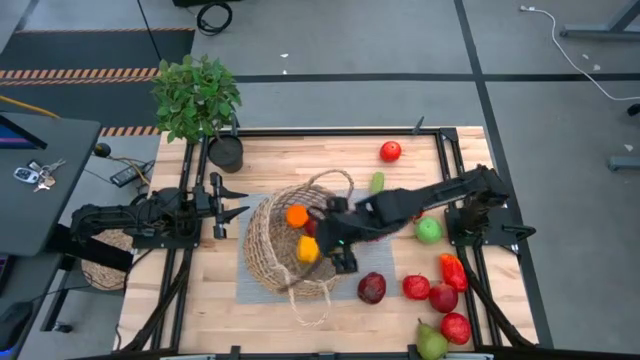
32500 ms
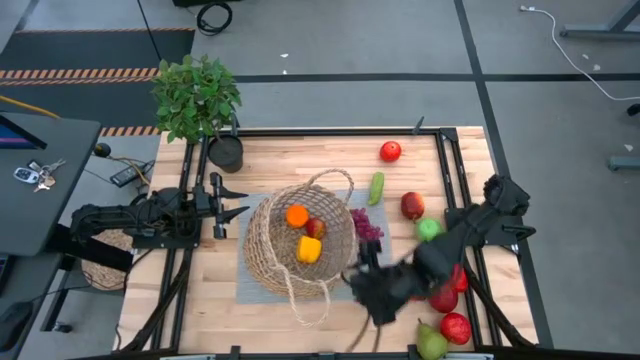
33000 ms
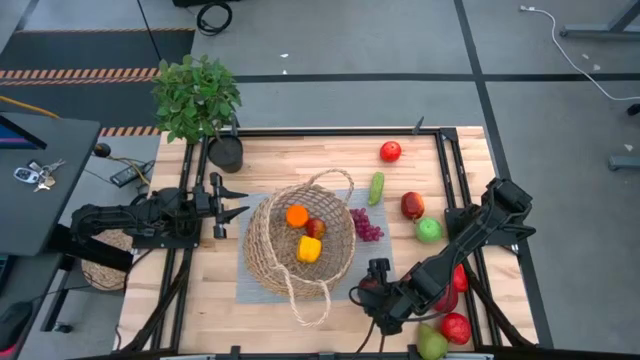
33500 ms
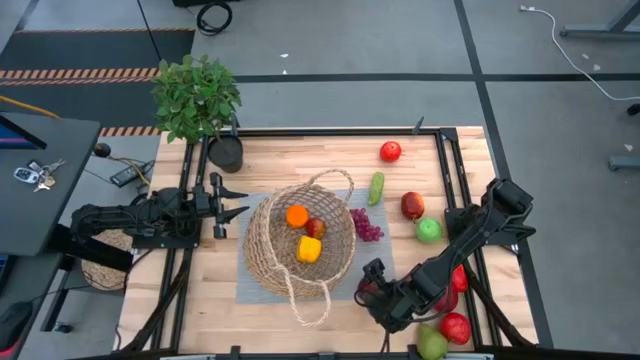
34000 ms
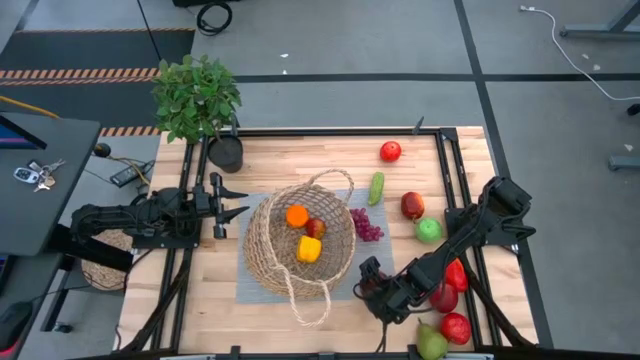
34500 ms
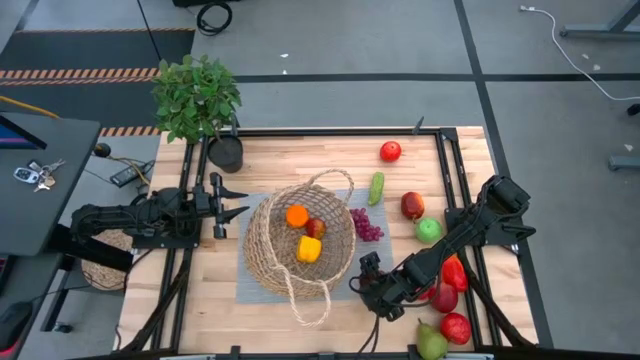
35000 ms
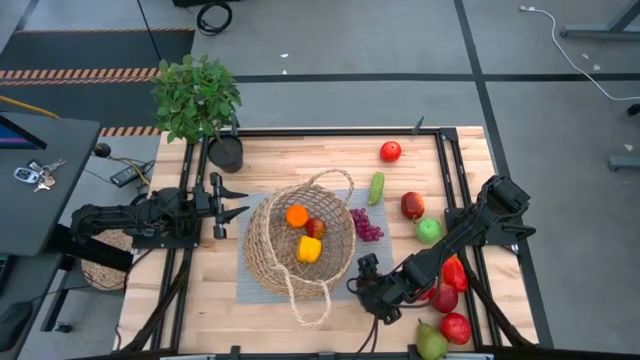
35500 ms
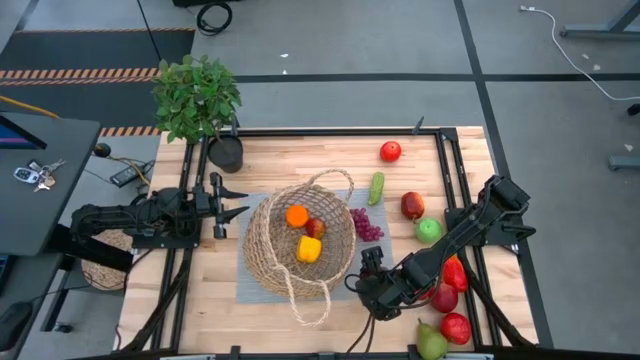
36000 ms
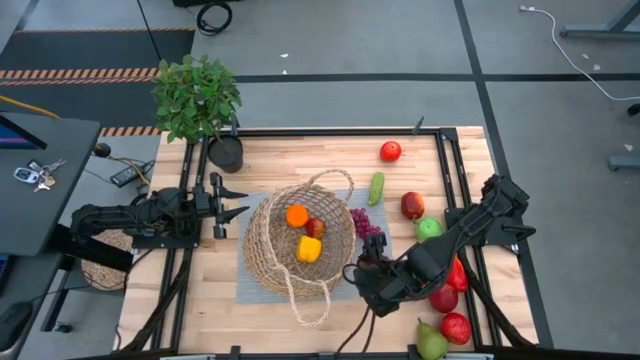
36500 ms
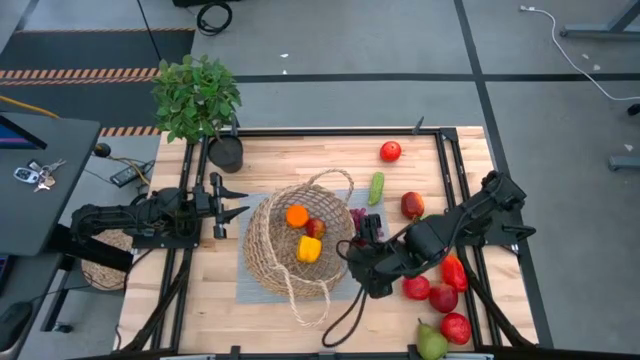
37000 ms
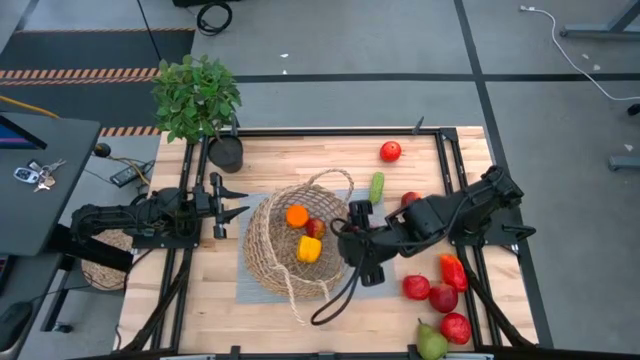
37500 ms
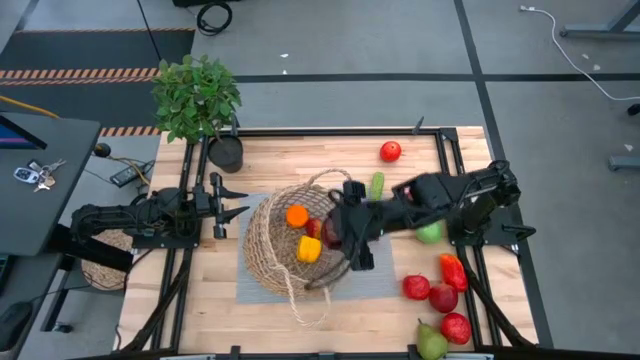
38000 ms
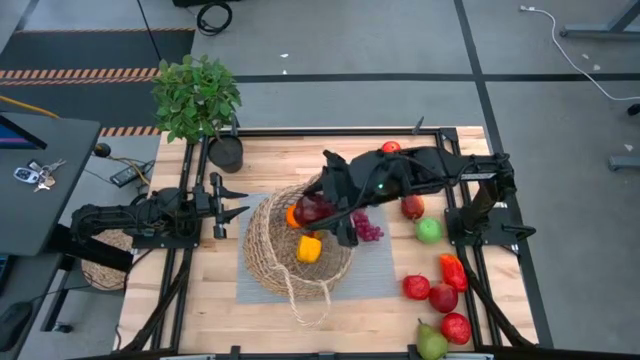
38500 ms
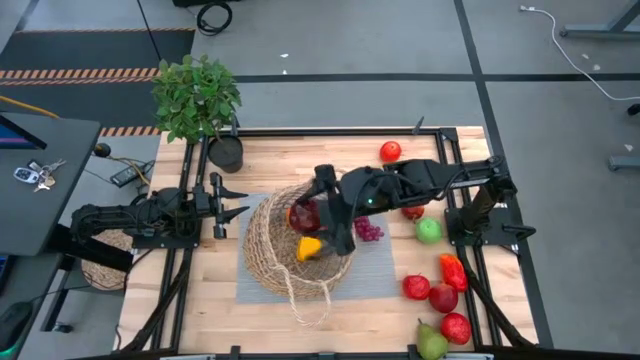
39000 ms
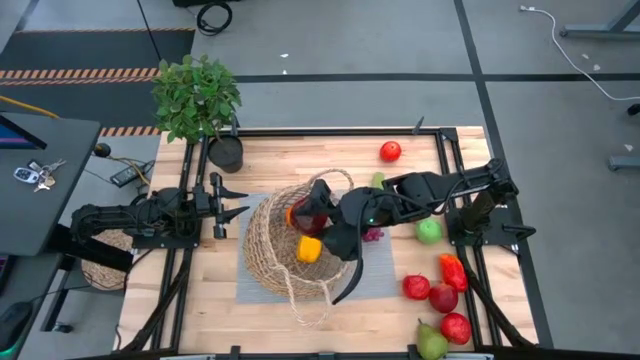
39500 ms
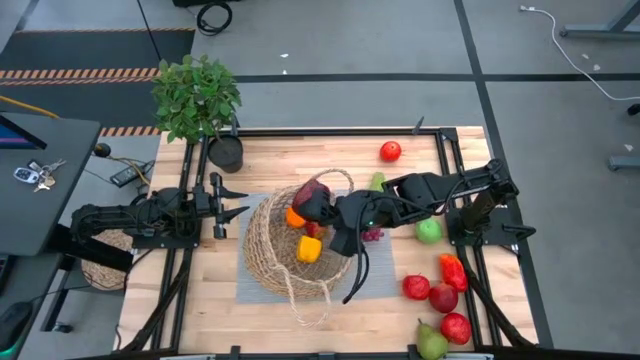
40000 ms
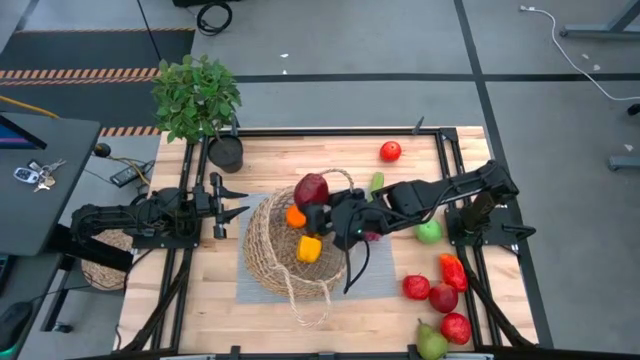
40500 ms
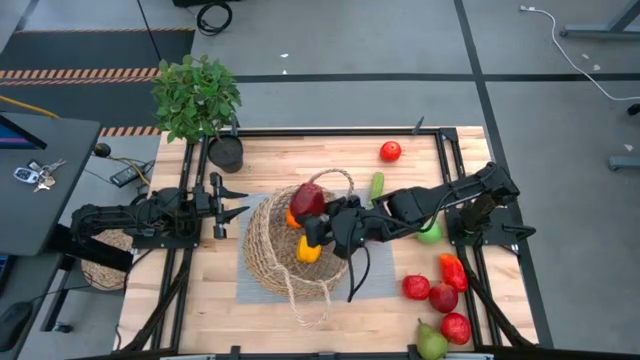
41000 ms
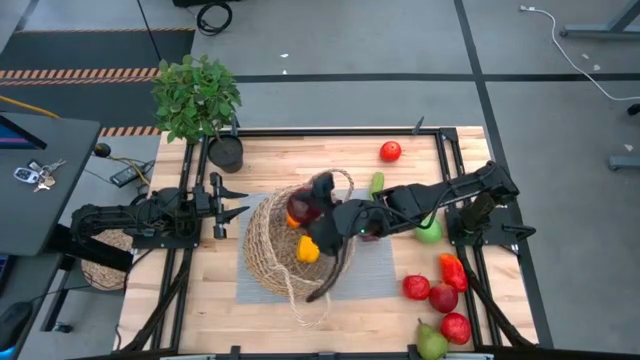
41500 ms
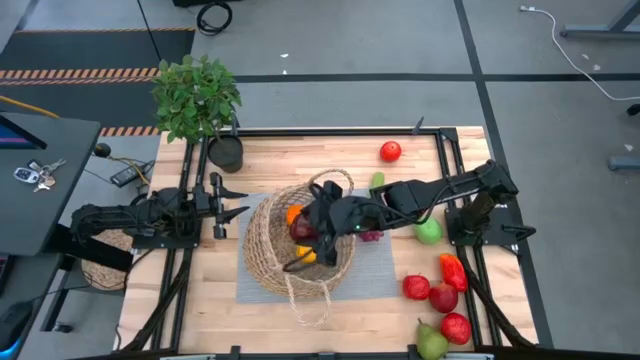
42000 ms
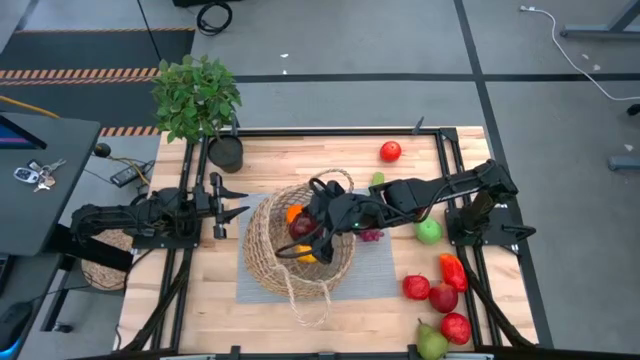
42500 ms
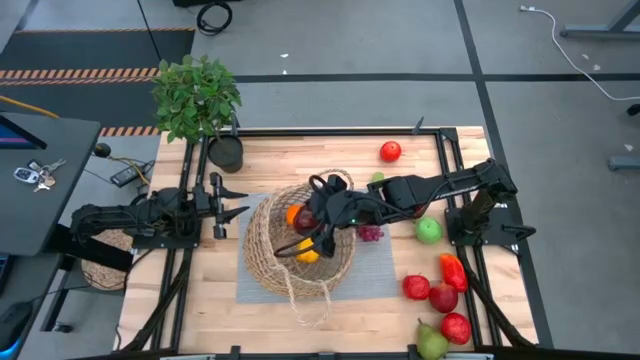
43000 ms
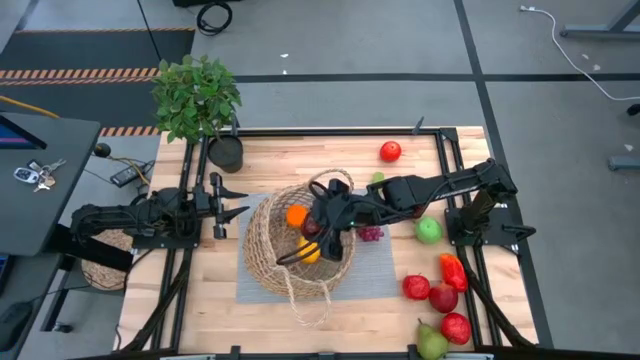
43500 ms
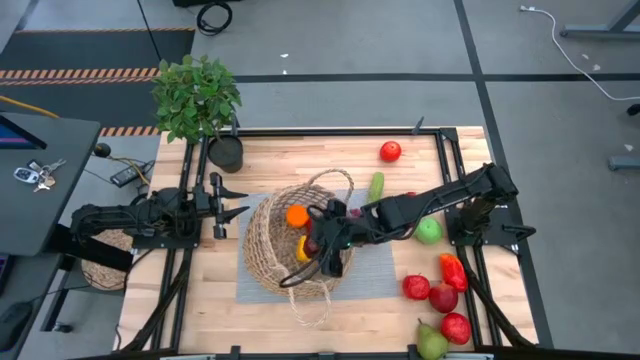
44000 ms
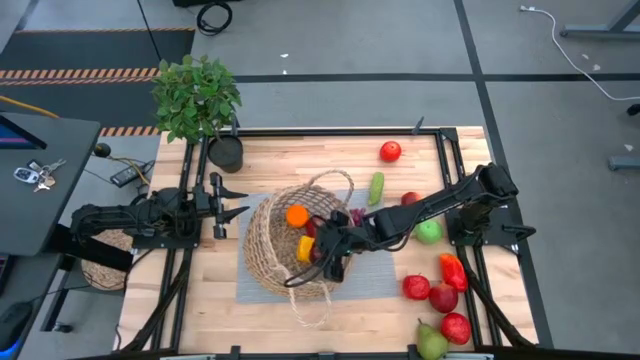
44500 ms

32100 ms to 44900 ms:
Task: Build produce basket
Put the red apple in the basket

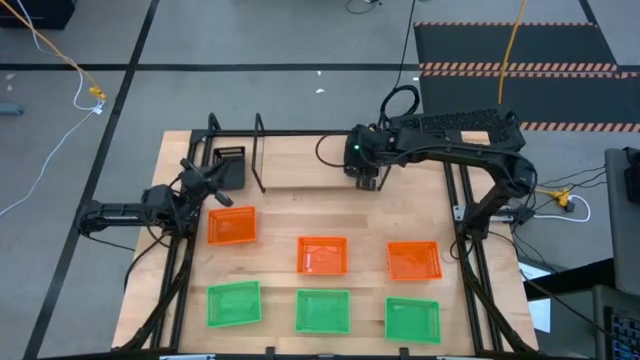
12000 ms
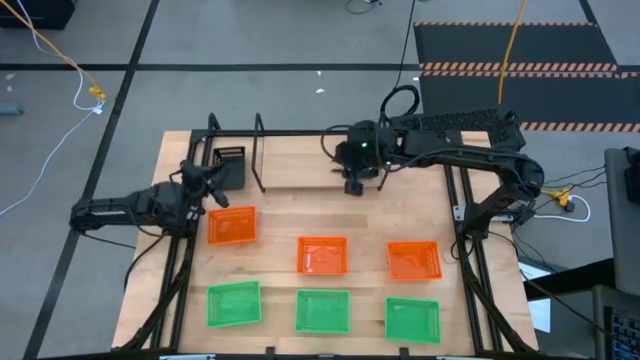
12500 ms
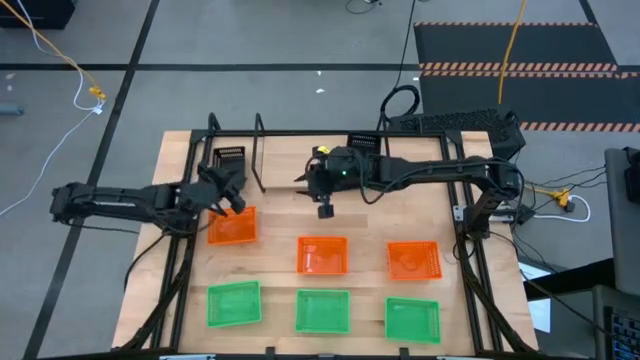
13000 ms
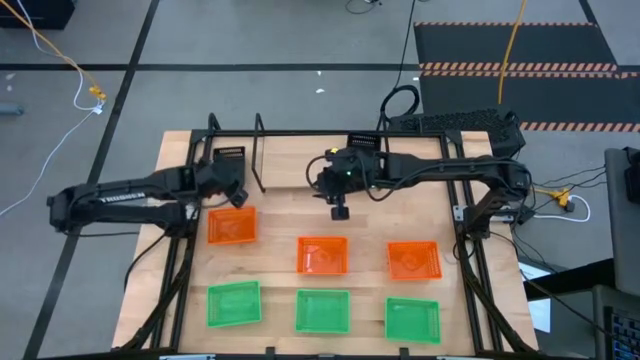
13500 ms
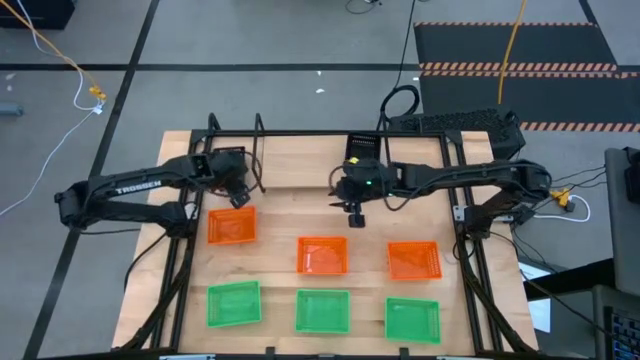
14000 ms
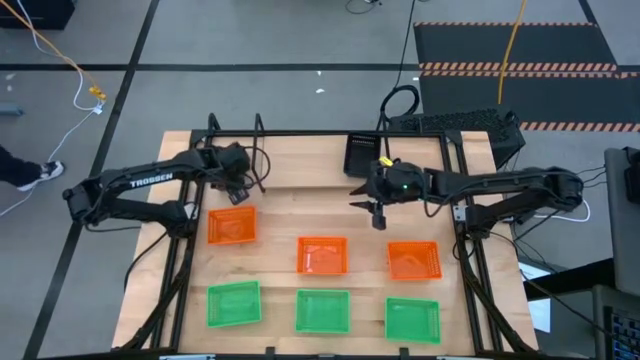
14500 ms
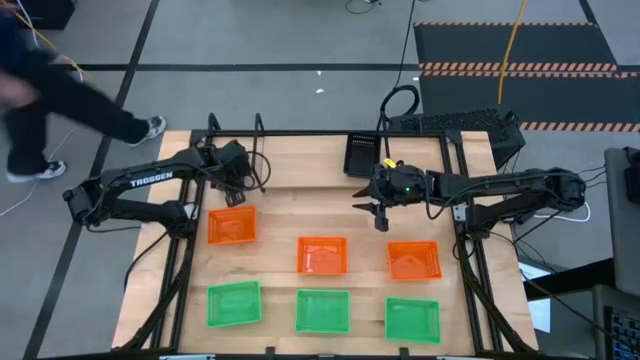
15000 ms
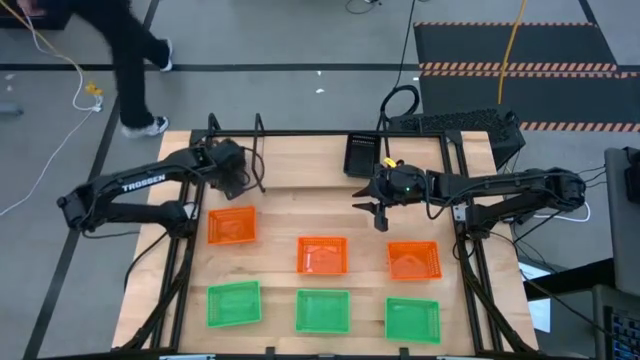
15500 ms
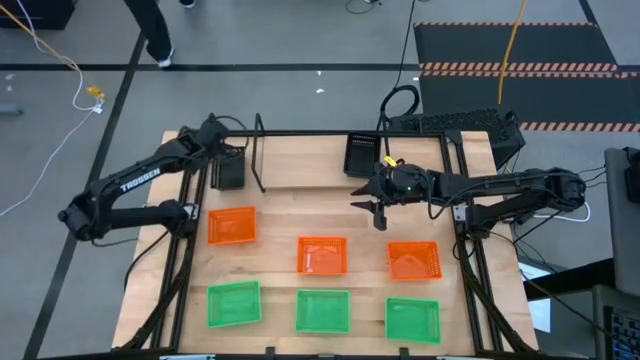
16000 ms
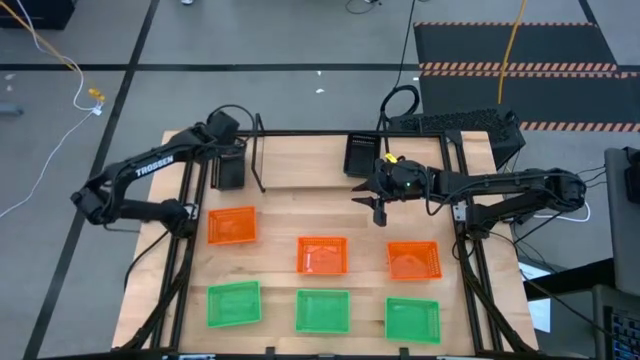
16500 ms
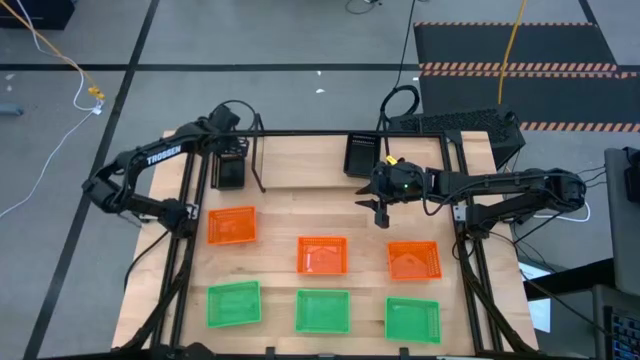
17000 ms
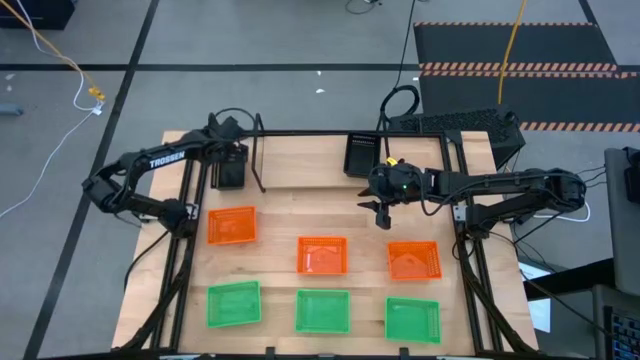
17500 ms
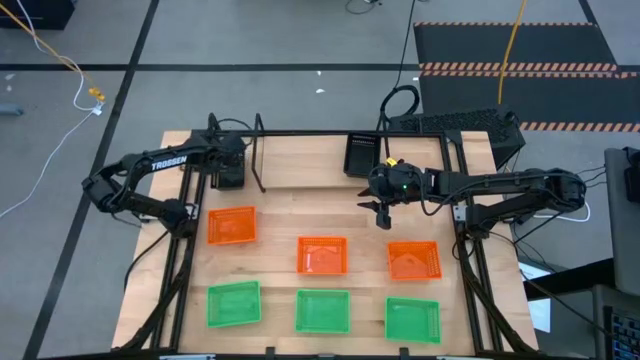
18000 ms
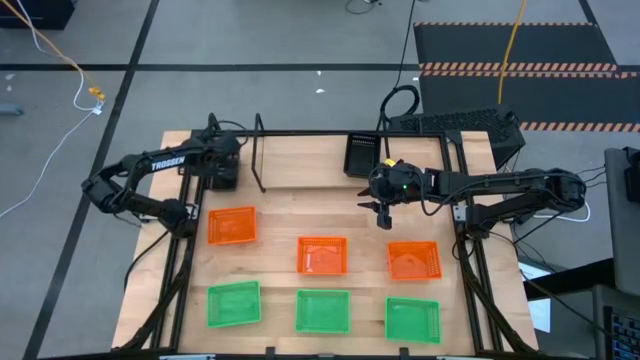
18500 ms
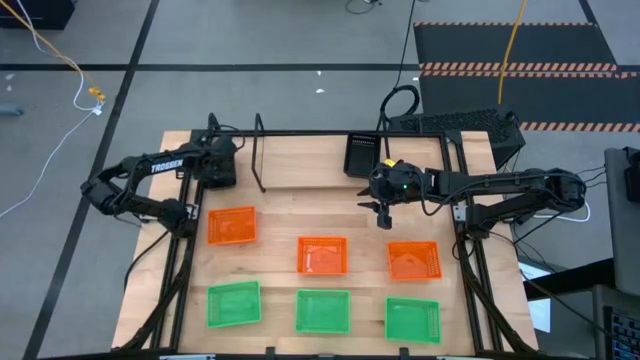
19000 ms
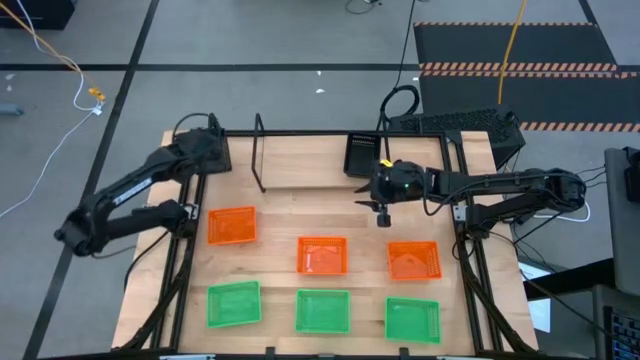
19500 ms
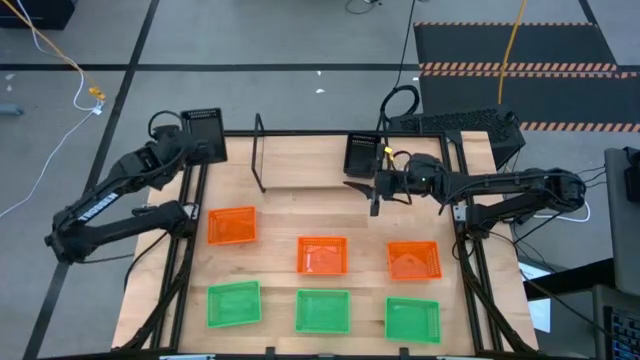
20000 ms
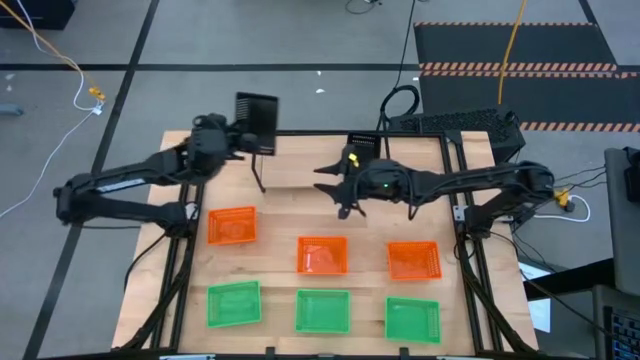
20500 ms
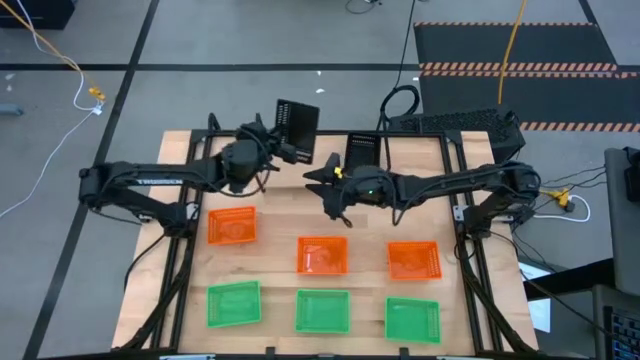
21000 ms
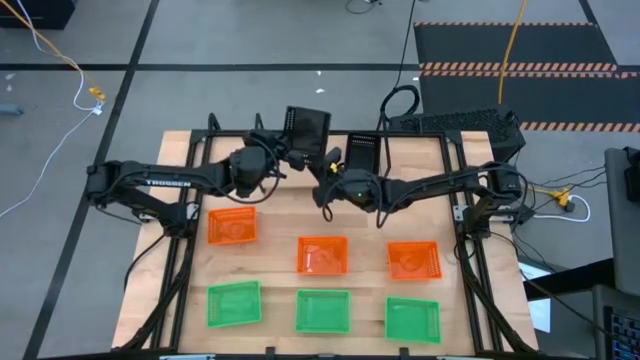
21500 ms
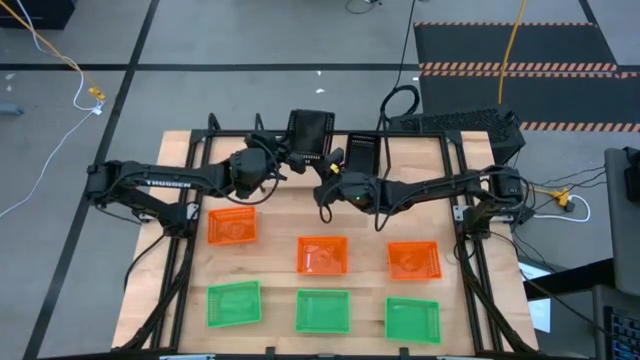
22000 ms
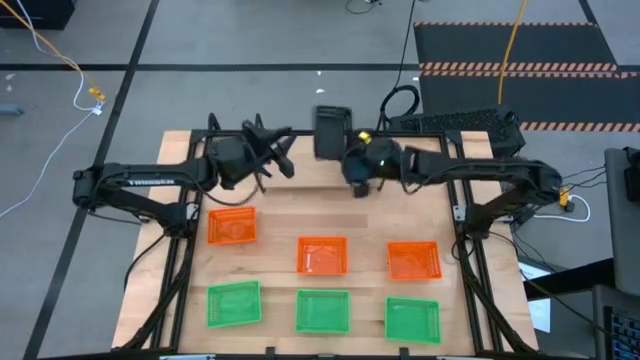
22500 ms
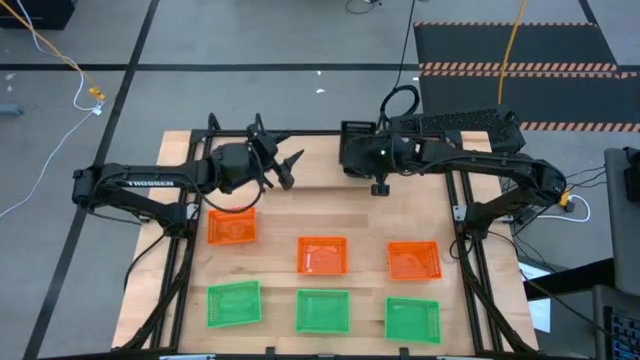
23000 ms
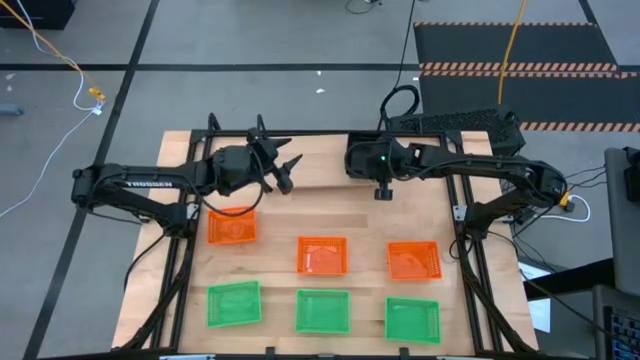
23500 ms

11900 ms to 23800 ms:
Task: Stack baskets on shelf by color
Stack the black bin on top of the black bin on the shelf
